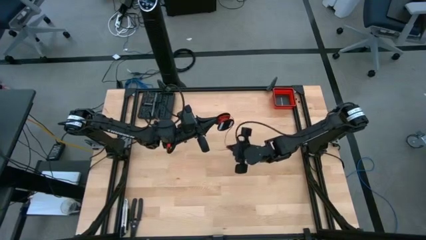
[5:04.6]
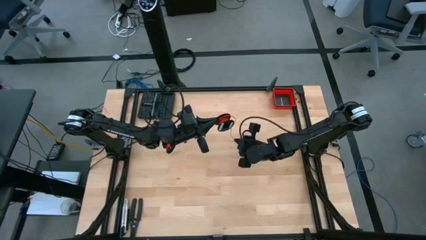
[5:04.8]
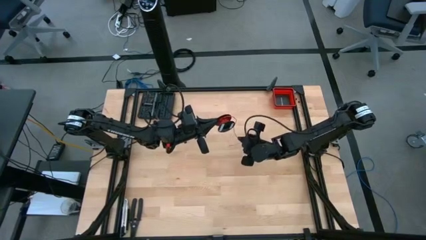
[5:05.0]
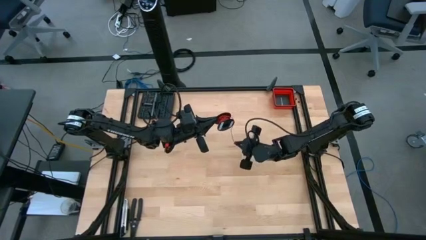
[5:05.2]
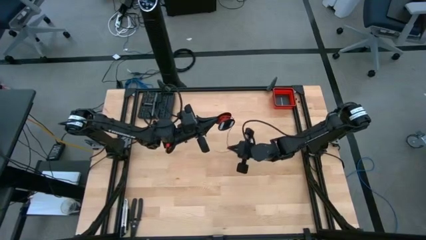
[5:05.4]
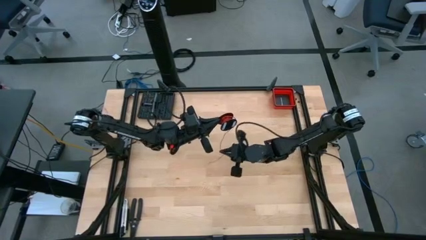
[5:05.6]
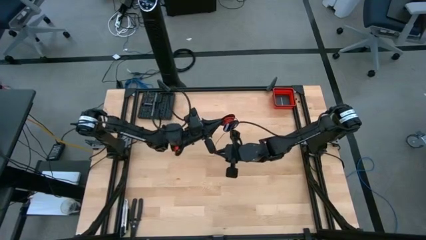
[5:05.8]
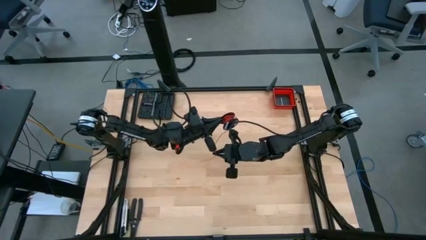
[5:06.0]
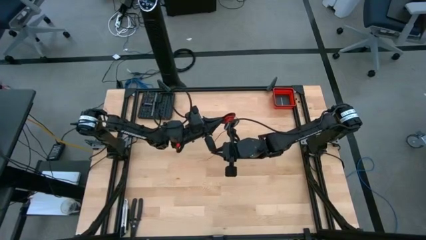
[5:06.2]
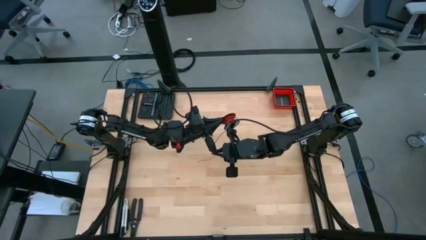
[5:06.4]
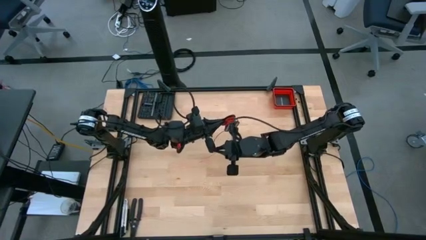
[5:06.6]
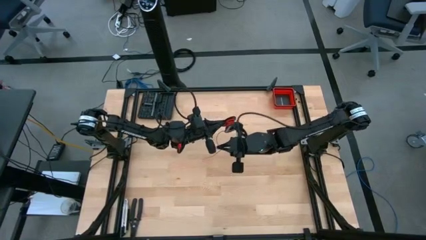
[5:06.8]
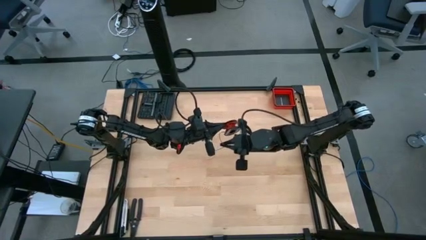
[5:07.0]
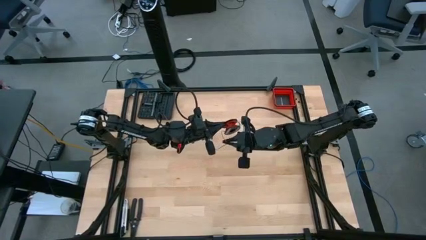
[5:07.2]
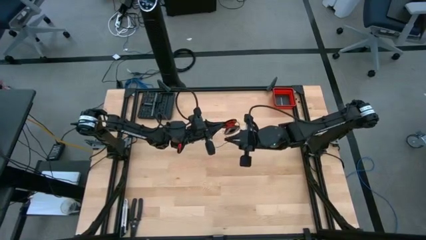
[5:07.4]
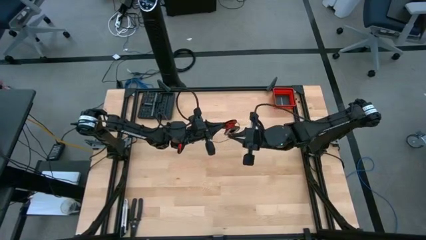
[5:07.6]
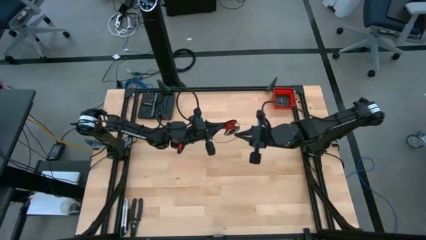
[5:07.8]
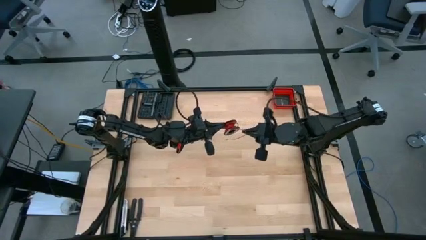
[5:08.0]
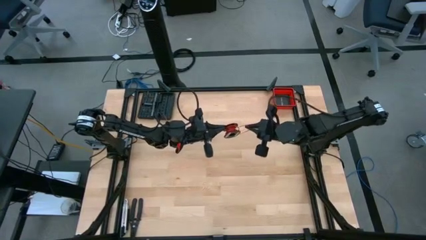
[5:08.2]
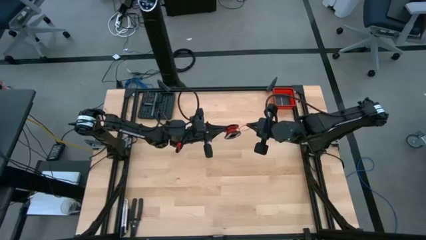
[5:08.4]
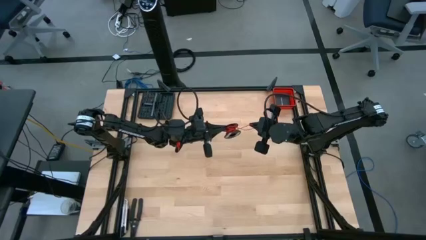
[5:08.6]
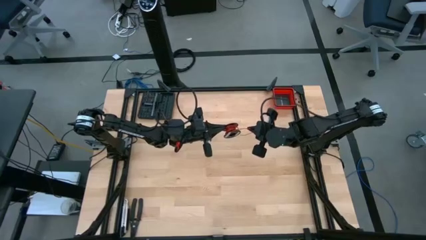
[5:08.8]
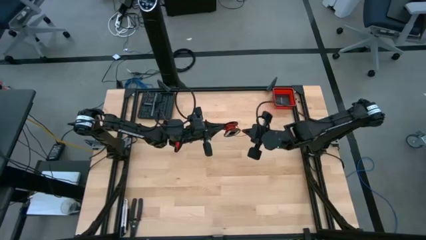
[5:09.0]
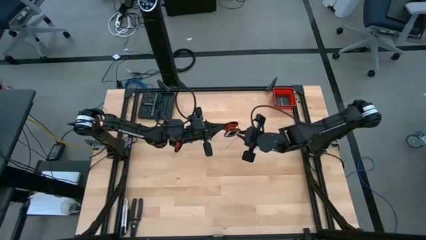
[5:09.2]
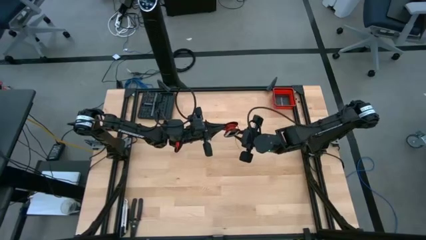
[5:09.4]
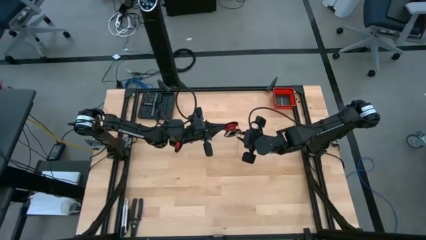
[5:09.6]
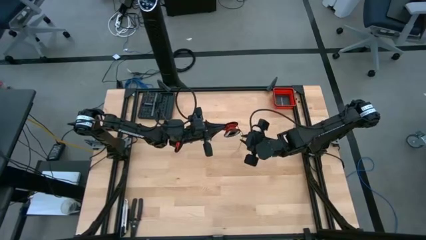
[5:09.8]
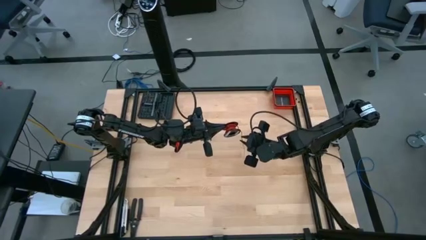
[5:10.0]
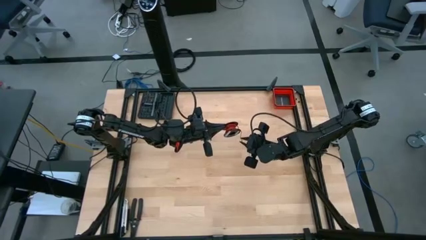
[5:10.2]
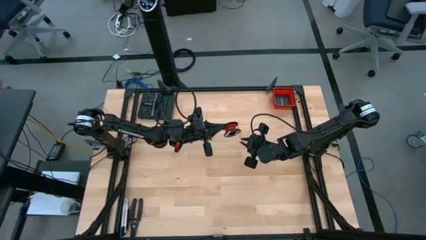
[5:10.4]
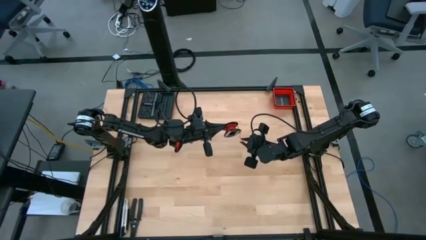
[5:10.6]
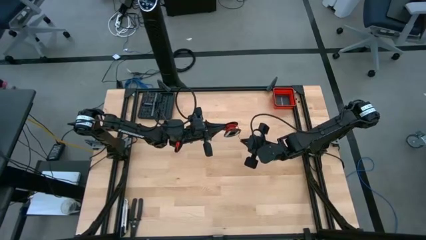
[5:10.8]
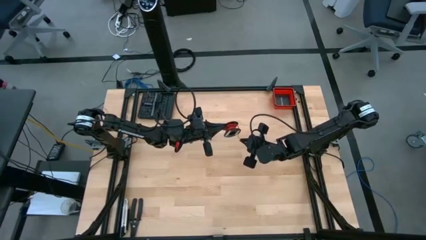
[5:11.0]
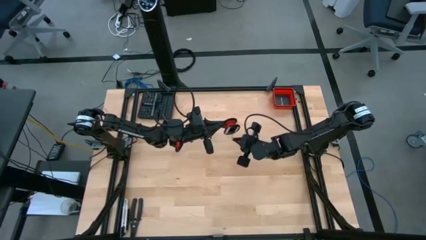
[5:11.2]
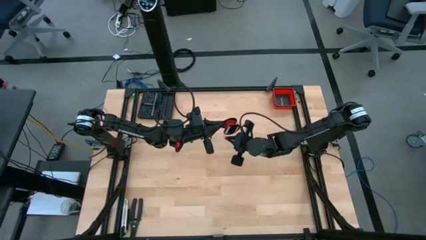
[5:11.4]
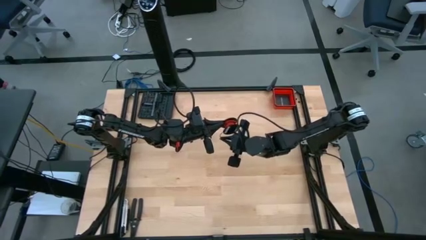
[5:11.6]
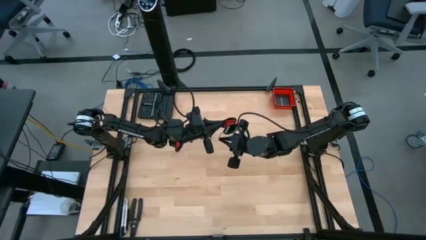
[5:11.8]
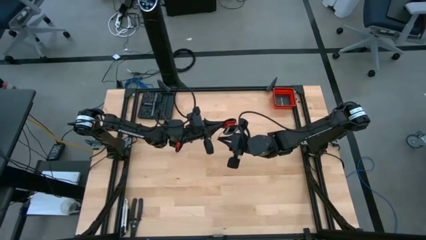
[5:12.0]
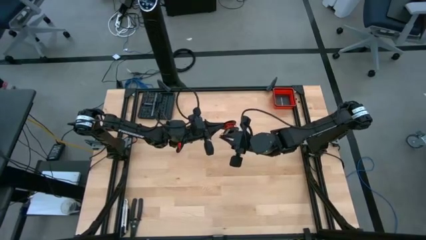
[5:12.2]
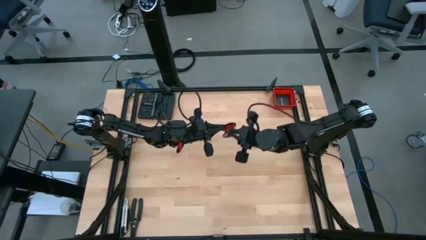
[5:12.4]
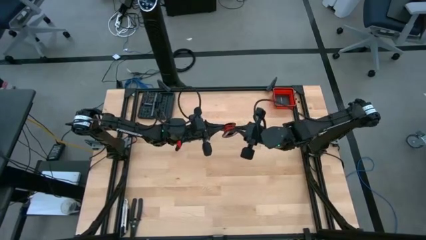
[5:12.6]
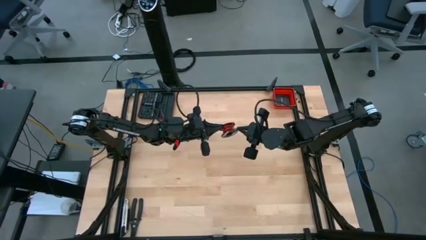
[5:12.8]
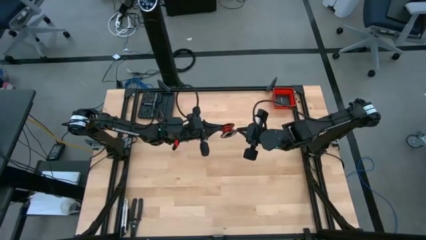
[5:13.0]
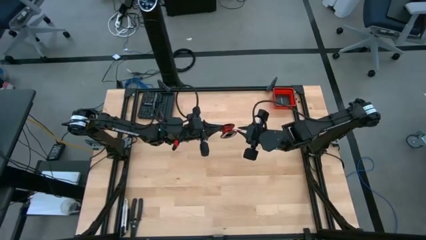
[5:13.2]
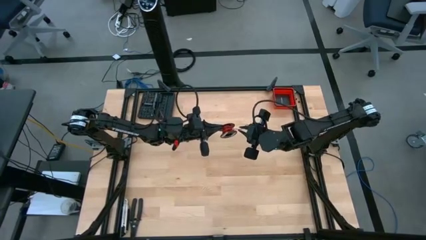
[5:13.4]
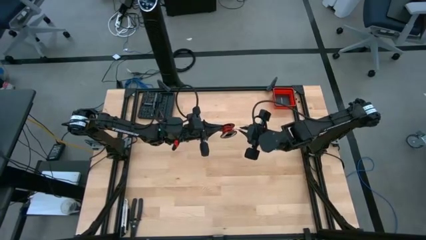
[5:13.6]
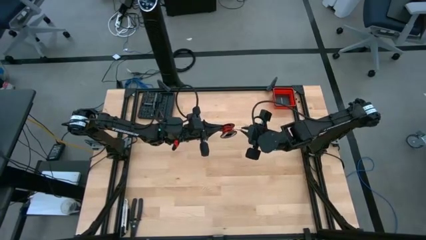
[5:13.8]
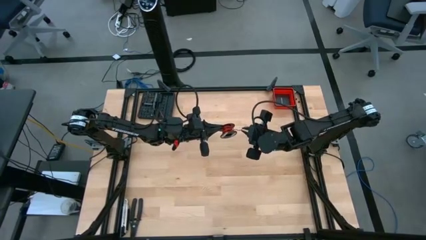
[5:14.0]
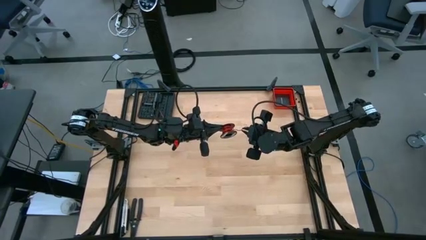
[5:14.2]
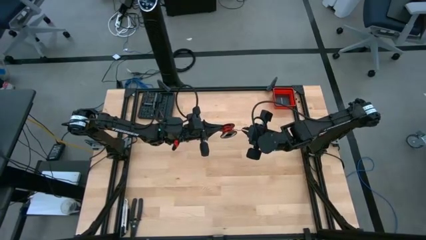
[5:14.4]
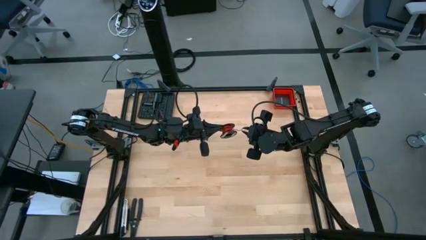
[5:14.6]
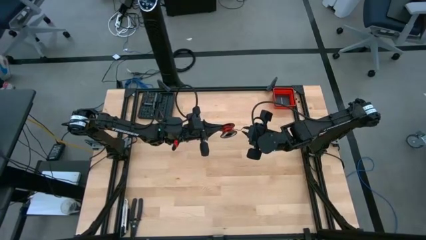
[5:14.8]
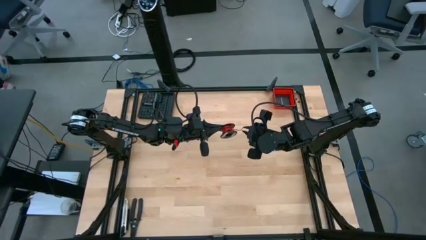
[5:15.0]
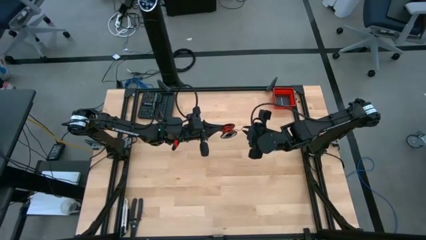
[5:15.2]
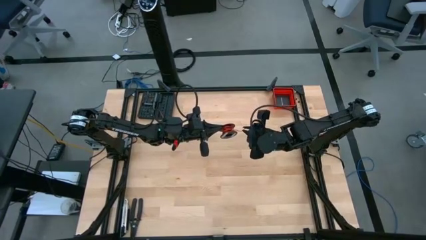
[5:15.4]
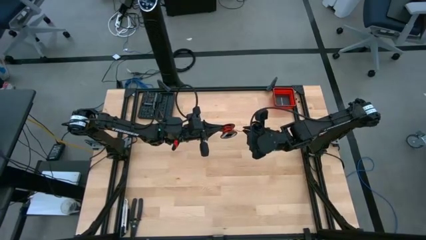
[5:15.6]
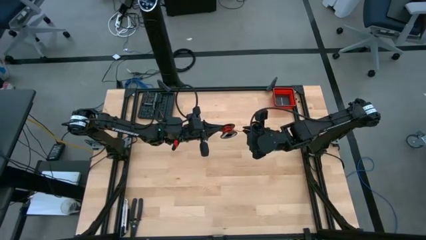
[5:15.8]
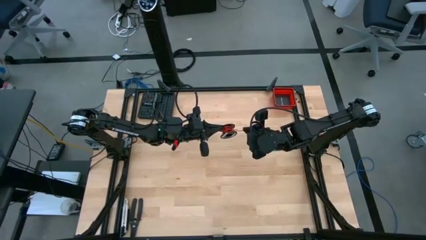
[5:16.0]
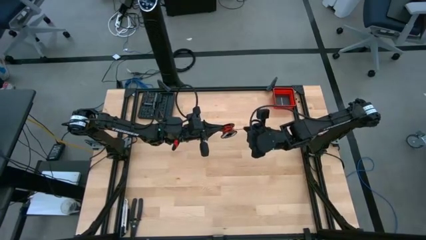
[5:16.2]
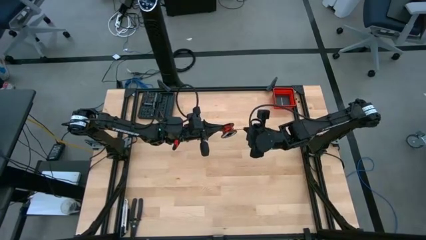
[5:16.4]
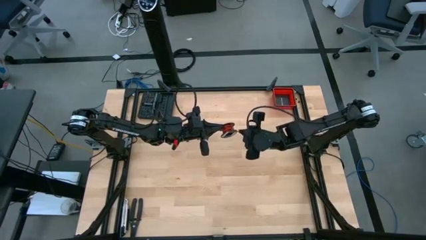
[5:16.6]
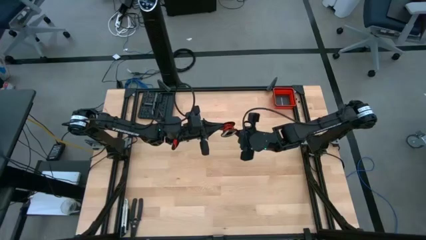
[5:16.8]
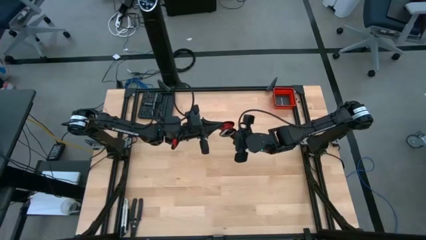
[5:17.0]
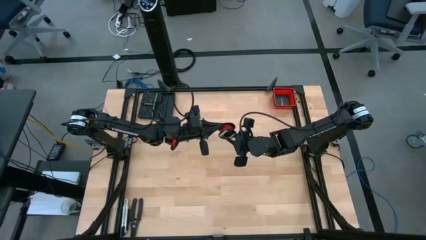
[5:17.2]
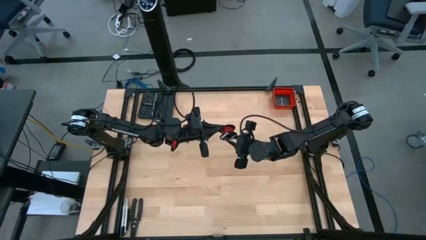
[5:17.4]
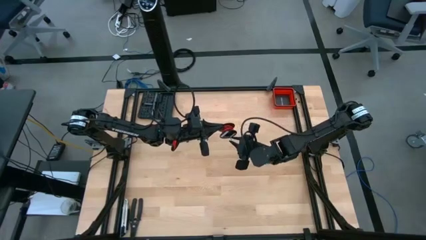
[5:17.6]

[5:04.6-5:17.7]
Task: Coil cords
Coil the red wire on the black spool

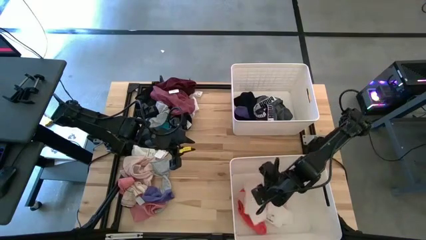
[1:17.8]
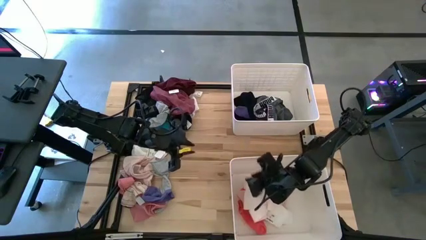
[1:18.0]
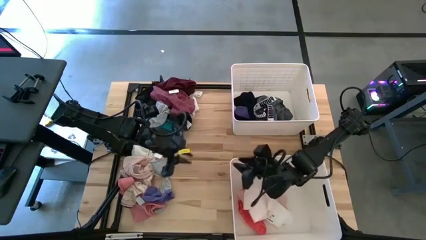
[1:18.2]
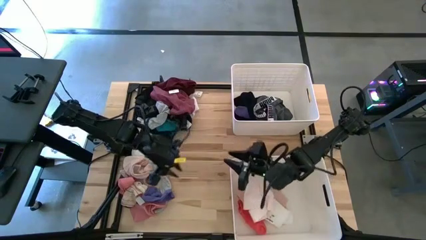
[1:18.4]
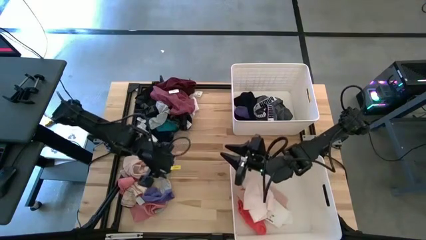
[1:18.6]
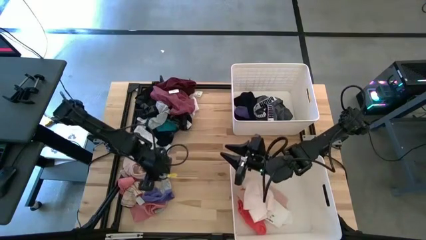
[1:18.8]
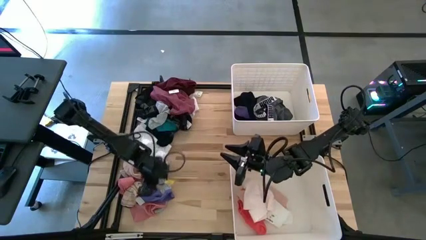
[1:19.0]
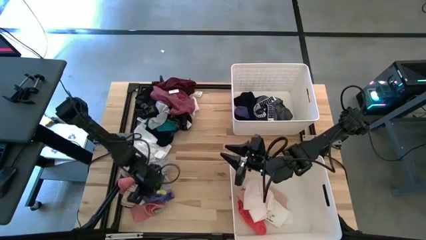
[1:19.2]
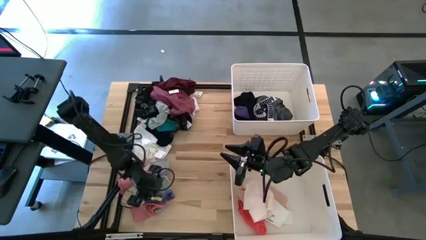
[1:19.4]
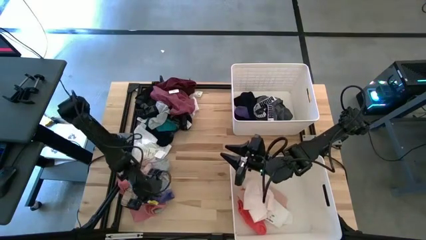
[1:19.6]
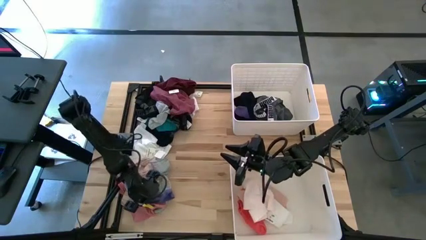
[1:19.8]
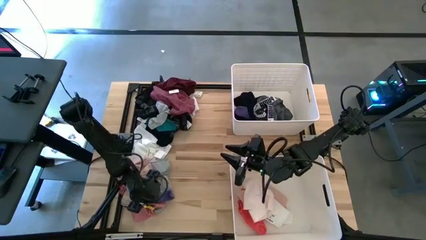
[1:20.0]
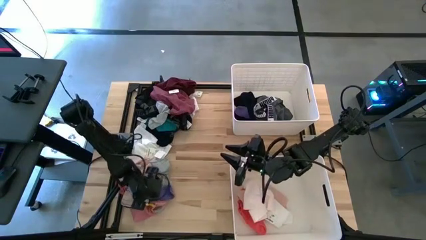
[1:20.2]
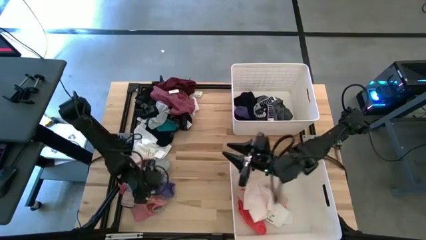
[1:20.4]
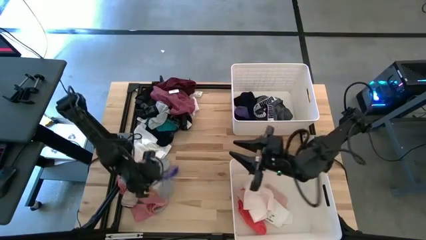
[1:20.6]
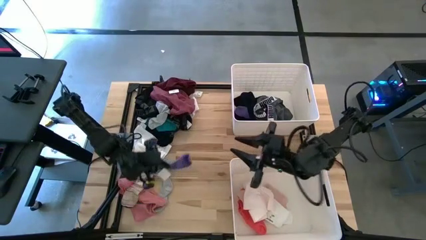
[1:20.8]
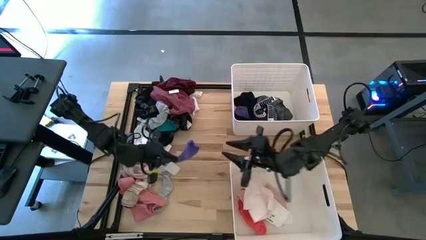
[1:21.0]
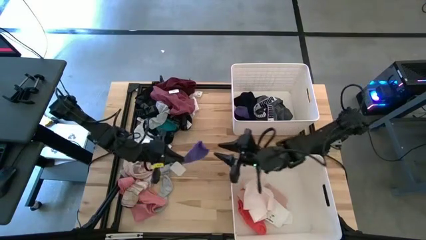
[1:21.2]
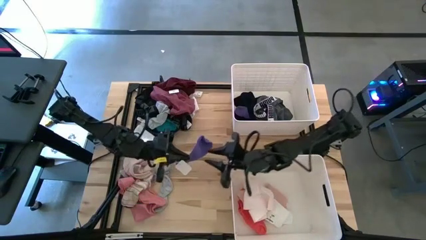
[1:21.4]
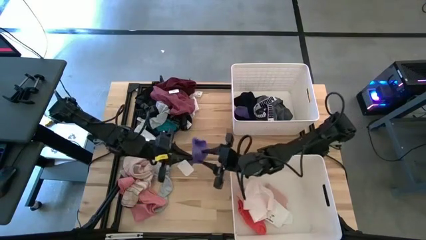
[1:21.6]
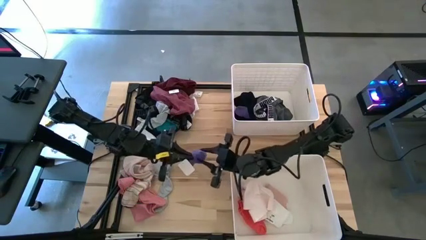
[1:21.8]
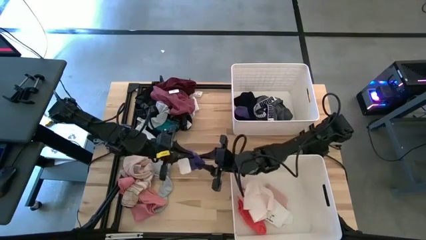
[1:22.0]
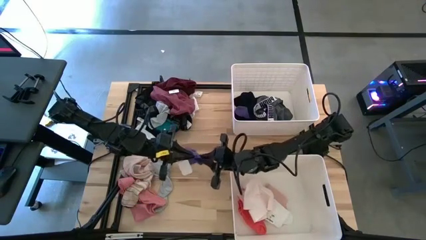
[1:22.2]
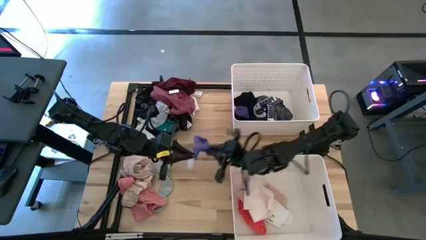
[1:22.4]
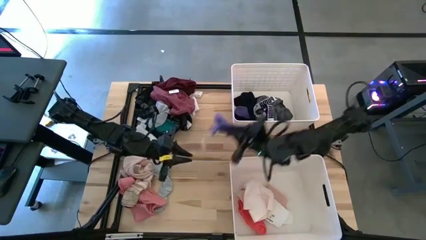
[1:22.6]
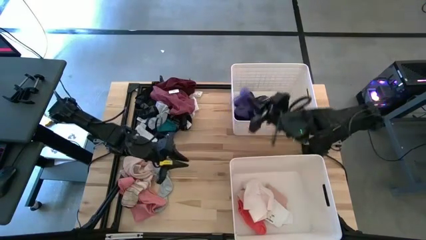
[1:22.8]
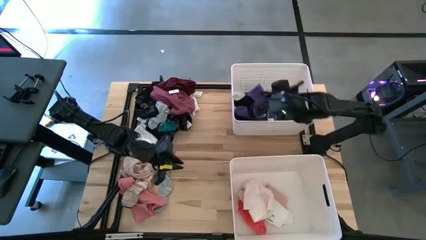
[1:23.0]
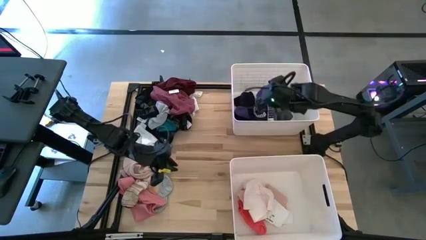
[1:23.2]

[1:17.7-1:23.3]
Task: Sort clothes
Put the blue sock into the top bin
